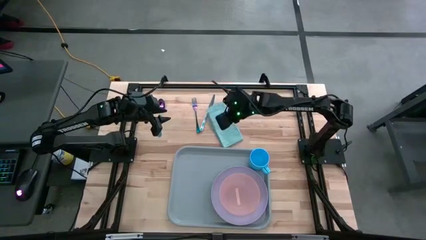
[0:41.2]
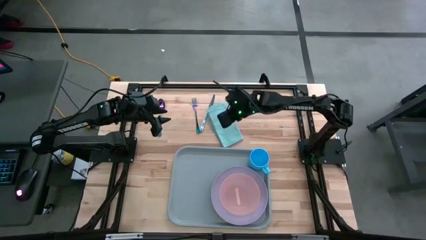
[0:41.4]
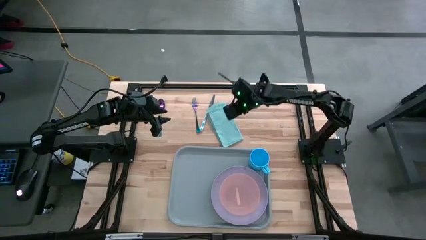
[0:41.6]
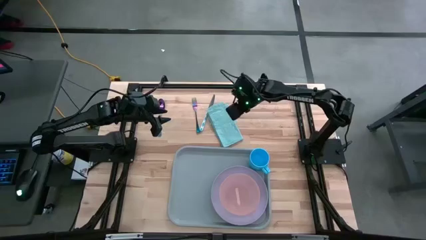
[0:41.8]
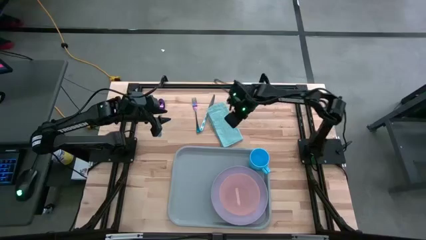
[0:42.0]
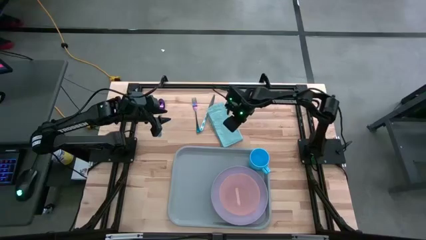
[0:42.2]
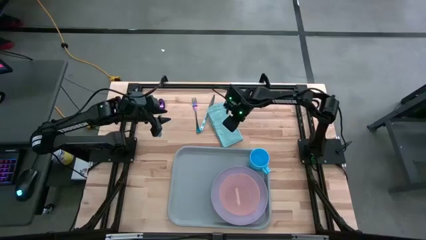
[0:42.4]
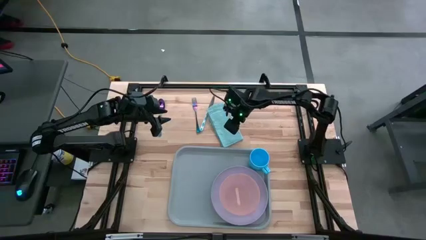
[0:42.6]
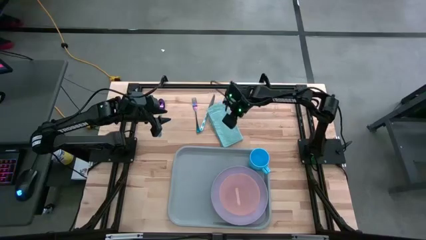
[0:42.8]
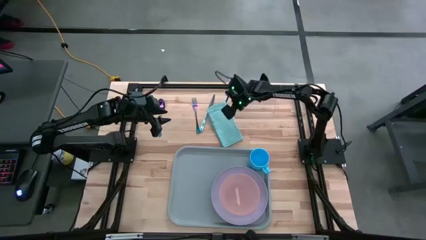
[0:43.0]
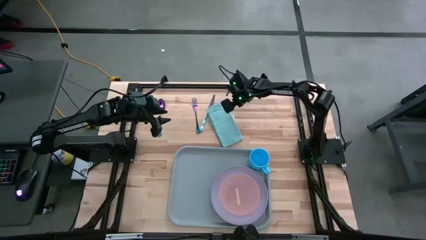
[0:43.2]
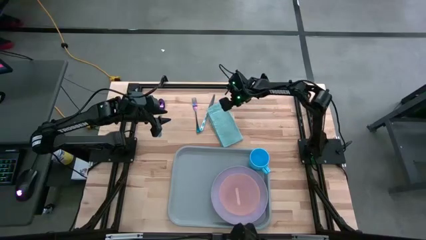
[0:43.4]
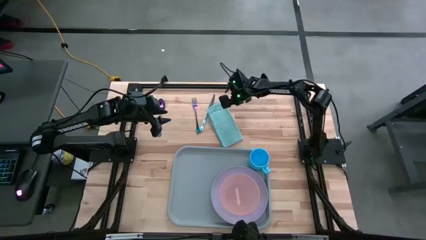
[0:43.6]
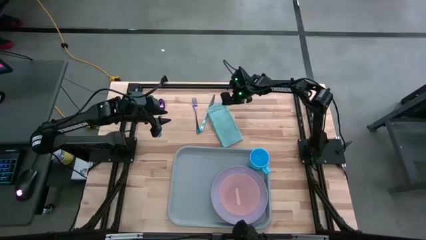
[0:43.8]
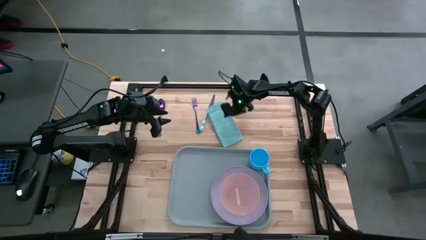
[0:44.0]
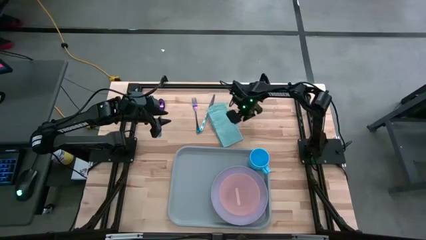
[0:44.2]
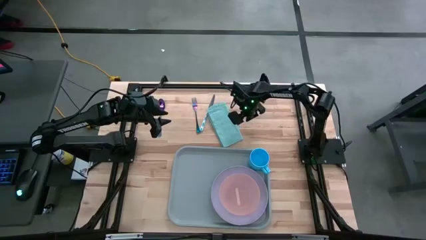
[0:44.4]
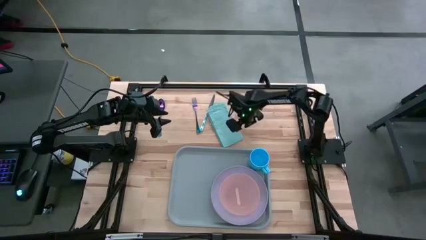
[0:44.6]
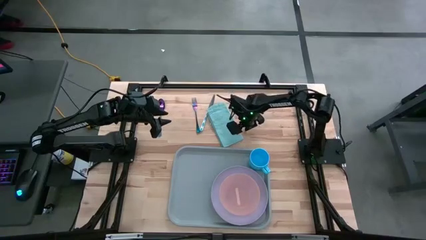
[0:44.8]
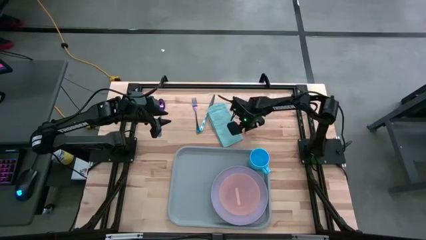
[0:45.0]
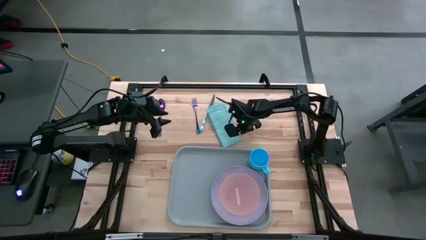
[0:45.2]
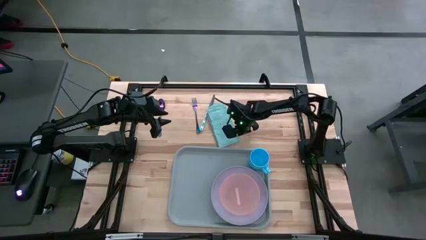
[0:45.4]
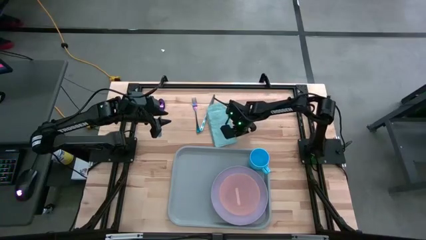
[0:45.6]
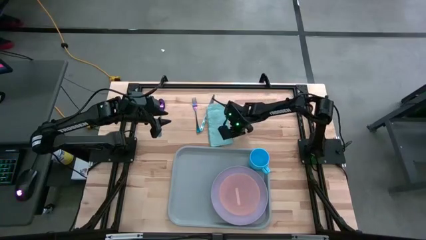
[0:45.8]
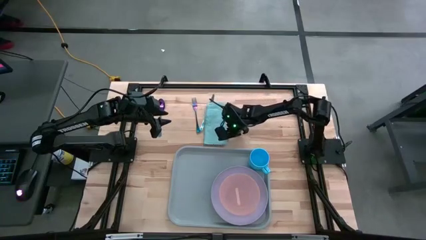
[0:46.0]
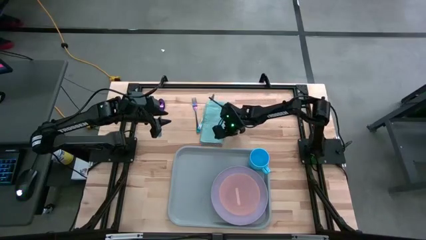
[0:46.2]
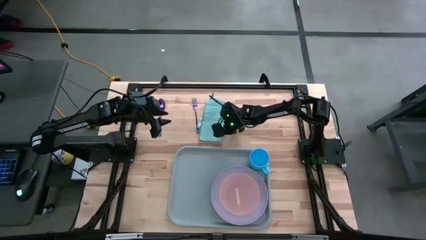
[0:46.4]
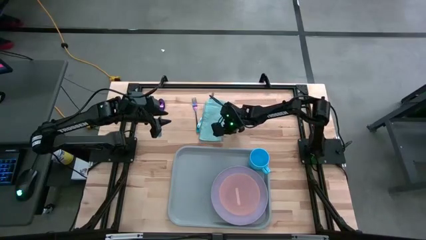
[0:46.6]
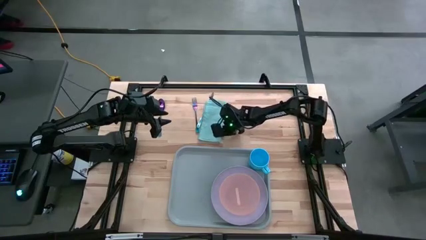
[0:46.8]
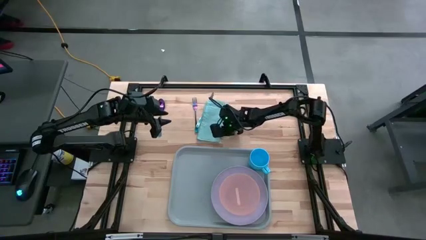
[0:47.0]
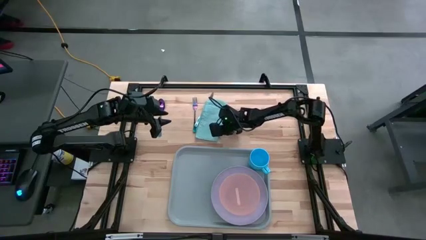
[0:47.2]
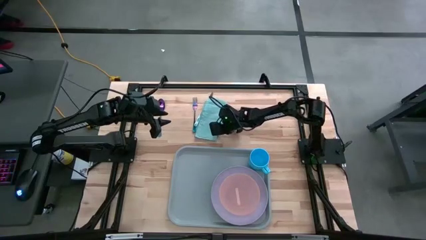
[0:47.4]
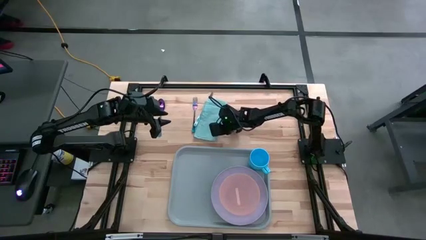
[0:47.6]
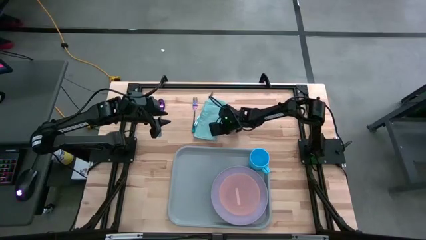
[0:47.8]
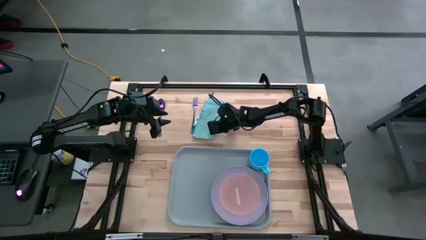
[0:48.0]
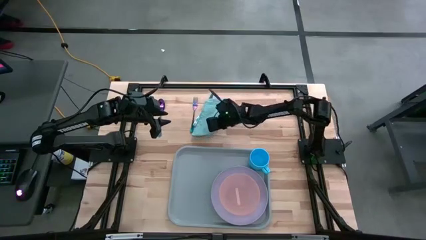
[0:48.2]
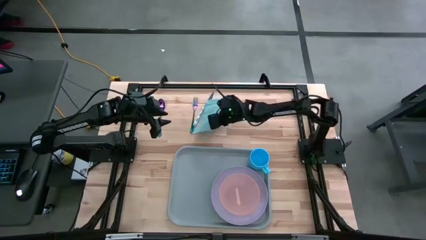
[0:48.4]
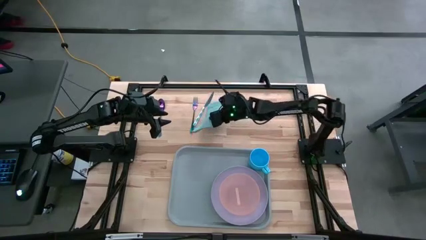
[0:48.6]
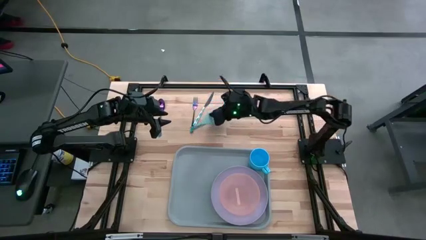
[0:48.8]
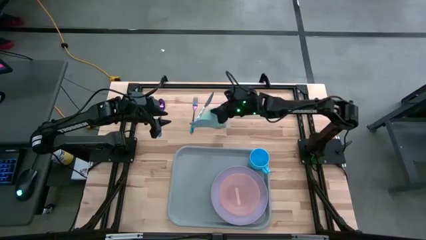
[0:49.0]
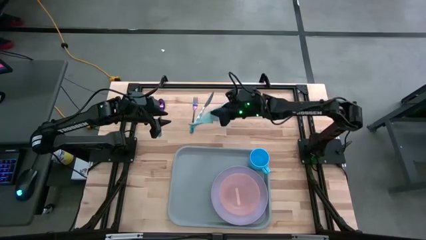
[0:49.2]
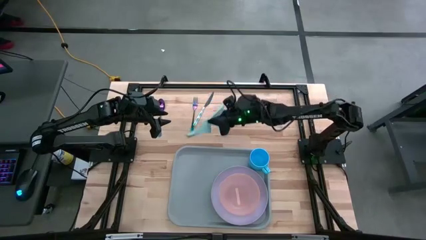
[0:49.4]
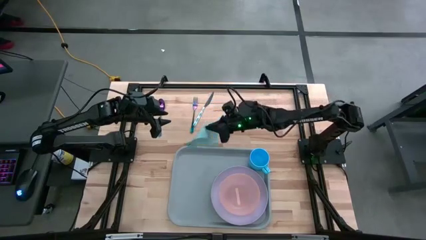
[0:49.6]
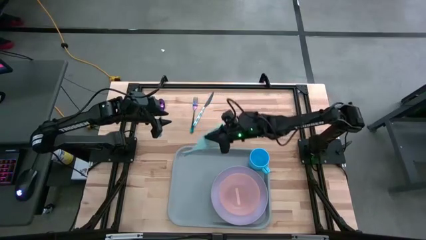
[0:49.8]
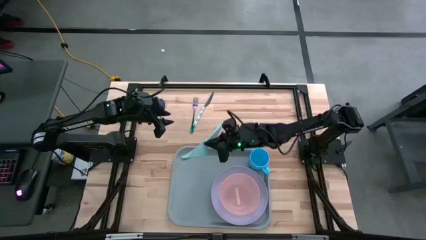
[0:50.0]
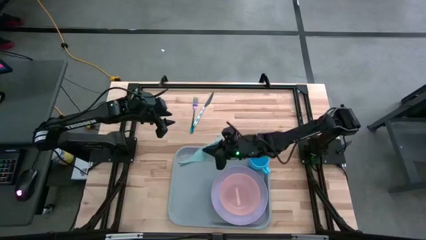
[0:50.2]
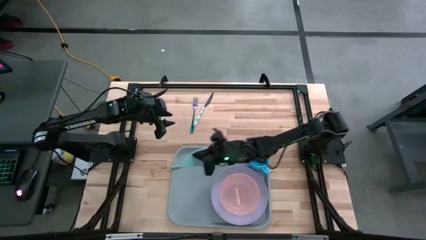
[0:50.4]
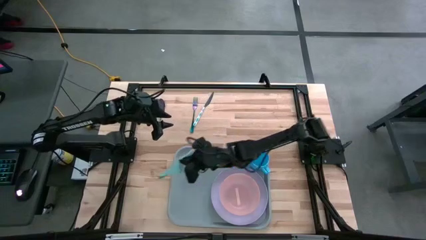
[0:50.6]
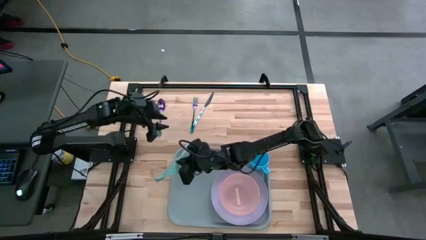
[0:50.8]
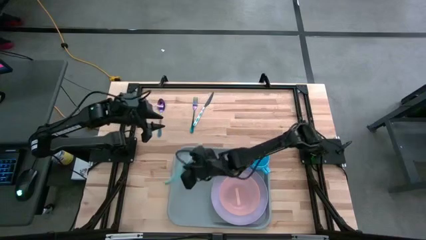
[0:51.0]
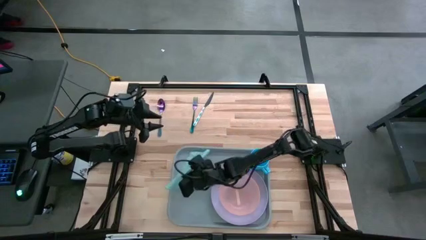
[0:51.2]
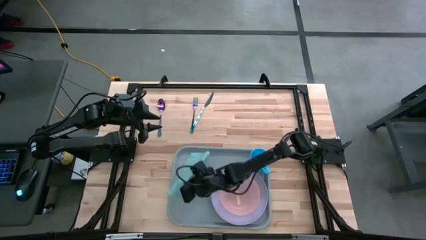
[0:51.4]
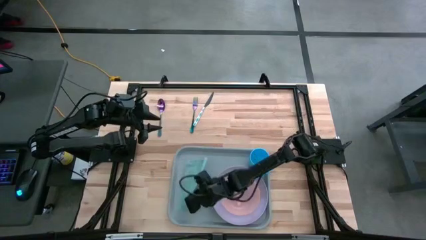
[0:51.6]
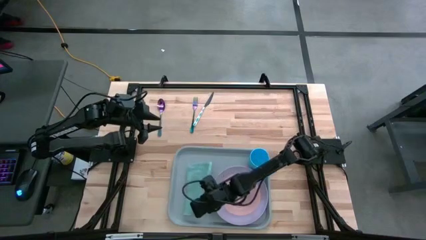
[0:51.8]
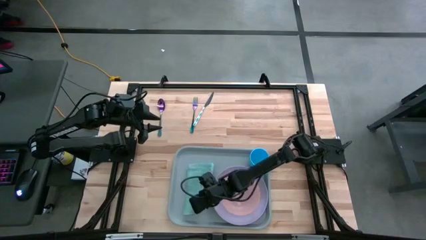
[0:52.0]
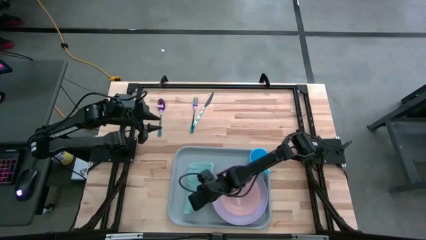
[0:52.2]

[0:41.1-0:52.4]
Task: Set up tray
Put the blue napkin on the gray tray to the left of the purple plate

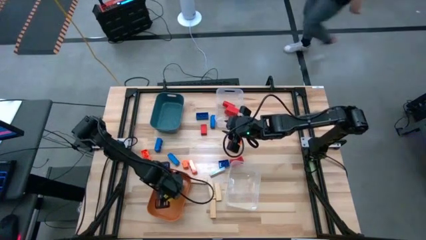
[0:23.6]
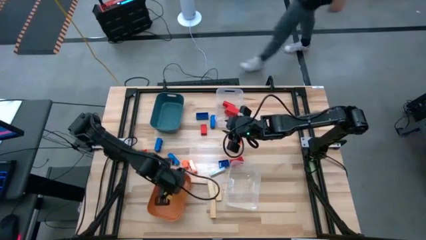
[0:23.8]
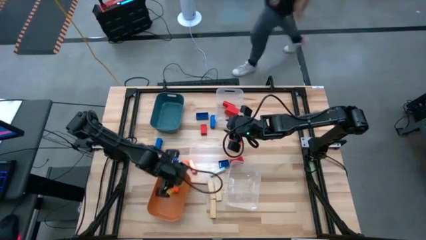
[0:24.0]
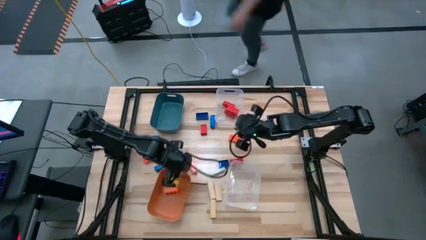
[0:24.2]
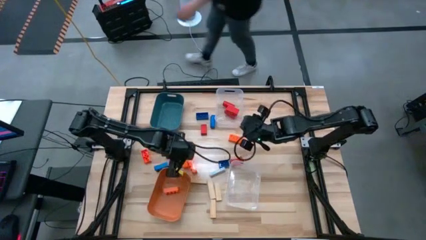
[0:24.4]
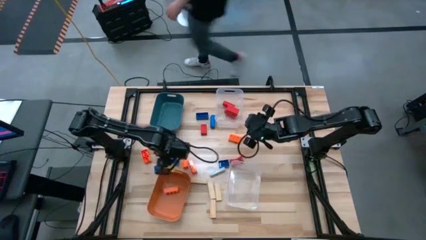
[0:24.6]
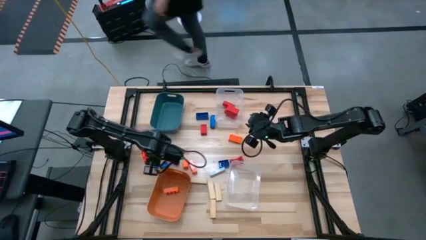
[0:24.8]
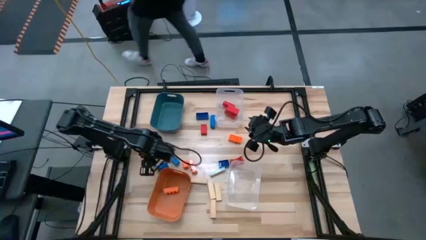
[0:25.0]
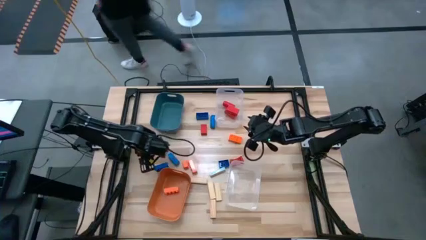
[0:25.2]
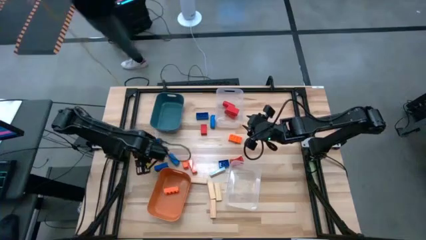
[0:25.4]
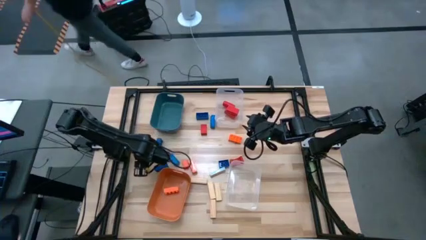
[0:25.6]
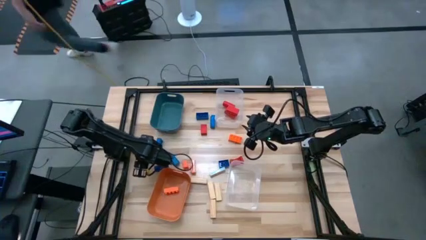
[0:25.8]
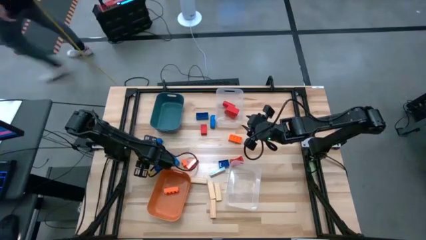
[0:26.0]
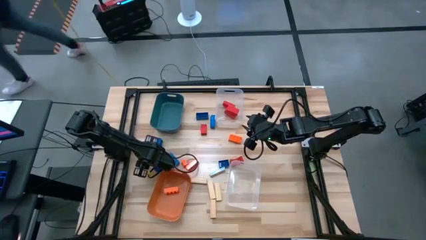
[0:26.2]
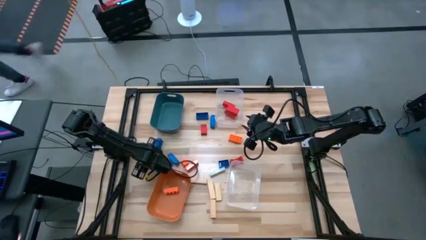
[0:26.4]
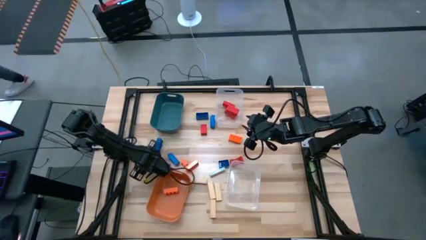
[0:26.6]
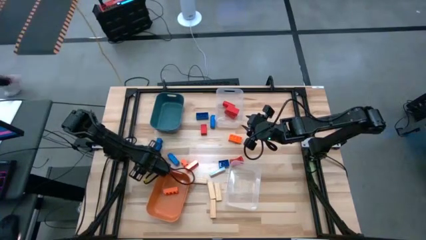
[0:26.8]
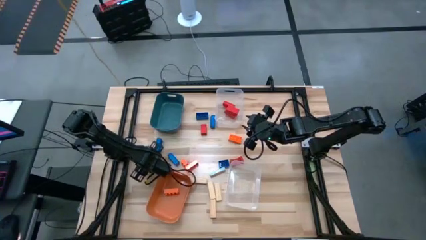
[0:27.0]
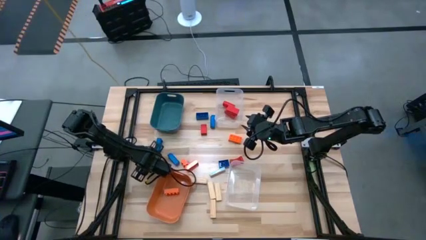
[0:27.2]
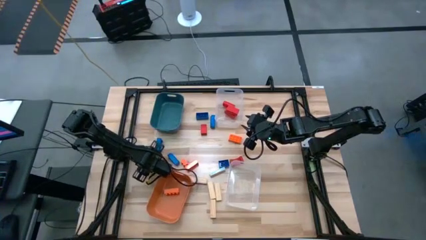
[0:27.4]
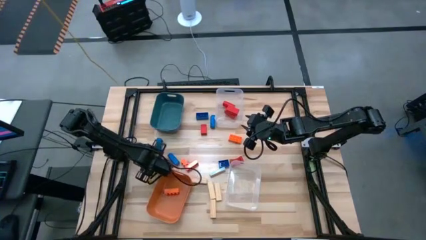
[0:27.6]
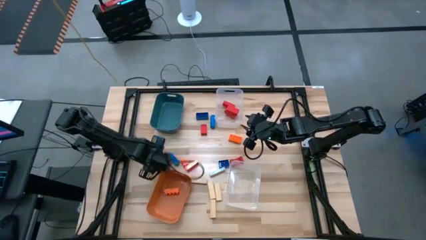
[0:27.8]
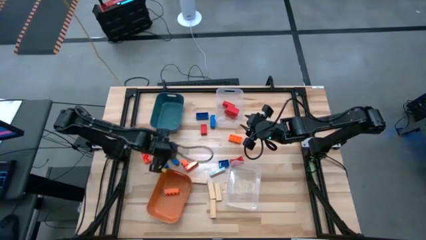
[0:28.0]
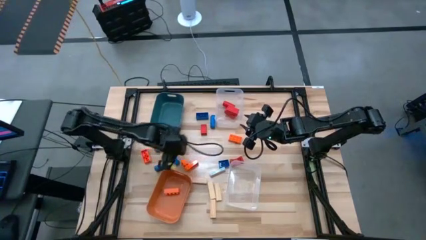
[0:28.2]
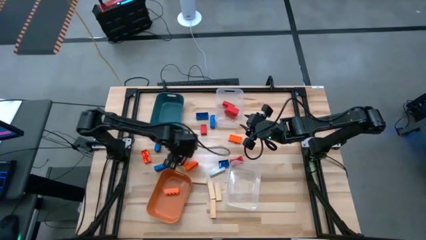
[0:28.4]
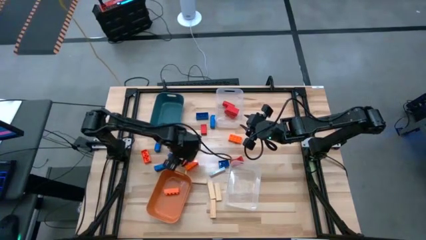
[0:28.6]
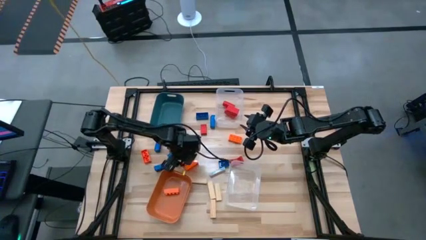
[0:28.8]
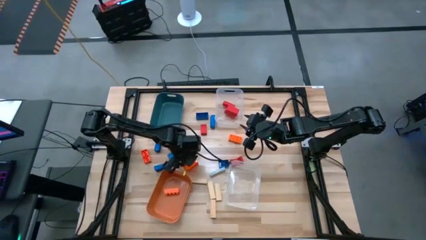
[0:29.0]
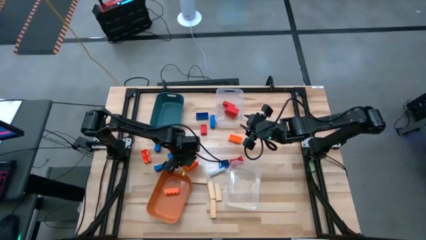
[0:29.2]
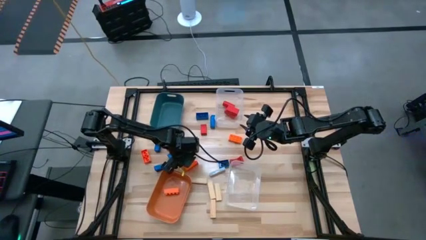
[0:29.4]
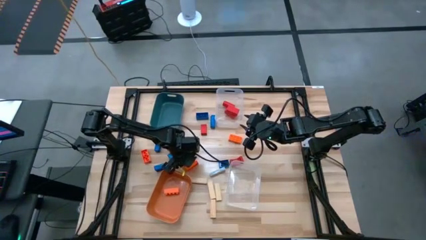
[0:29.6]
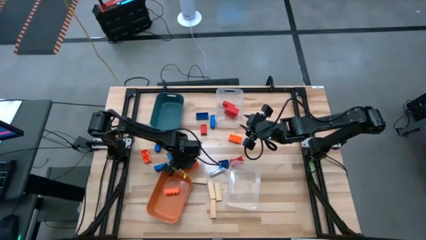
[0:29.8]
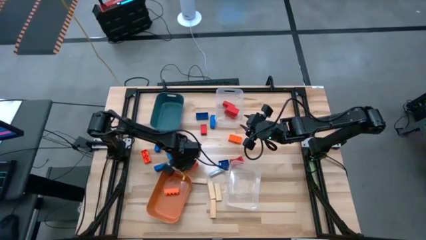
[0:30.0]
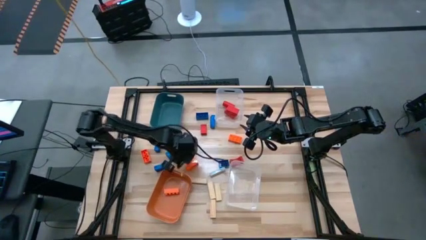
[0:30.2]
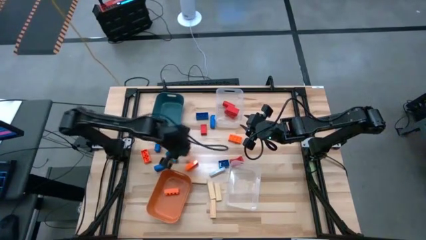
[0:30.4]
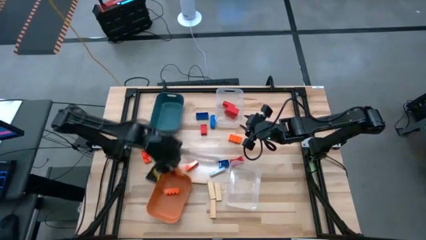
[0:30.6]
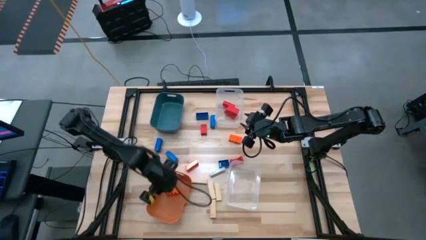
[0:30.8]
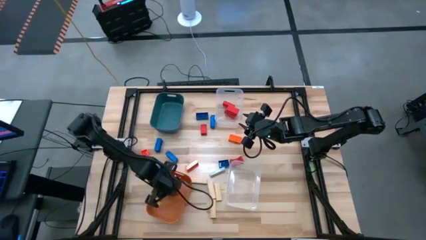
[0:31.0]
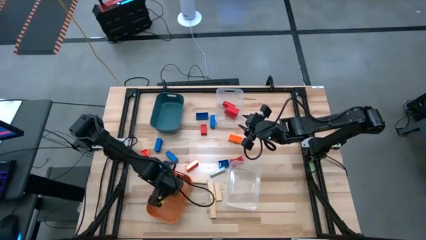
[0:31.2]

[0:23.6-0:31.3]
Task: Sort blocks
Put the orange game piece into the orange bin
